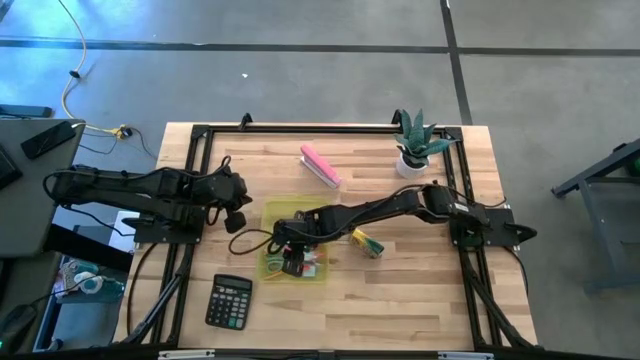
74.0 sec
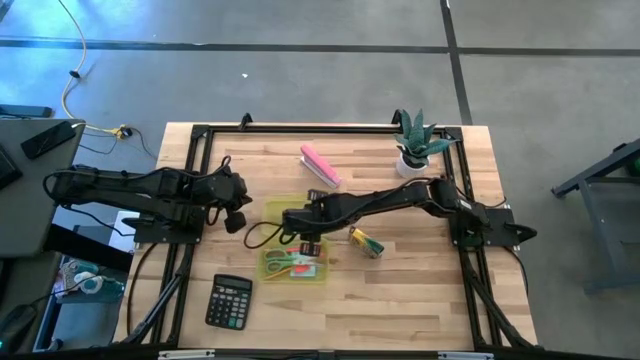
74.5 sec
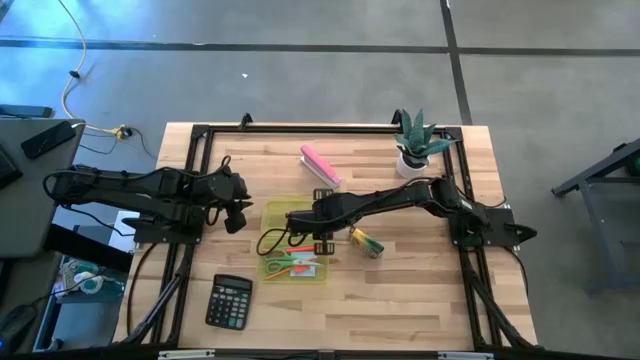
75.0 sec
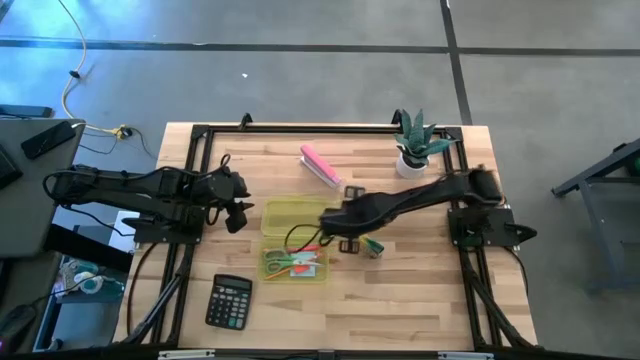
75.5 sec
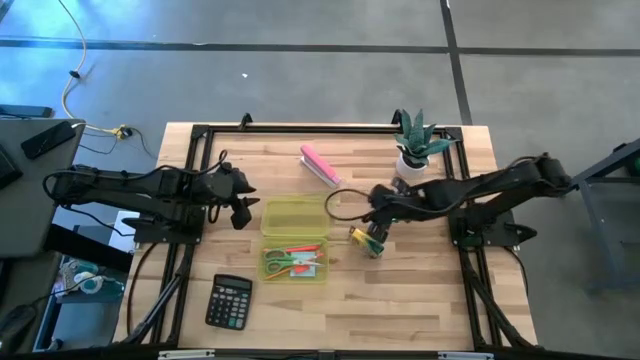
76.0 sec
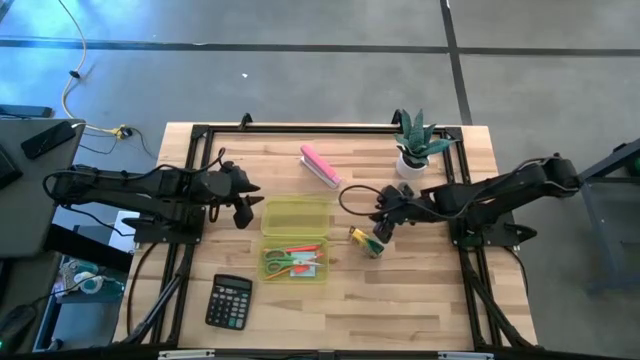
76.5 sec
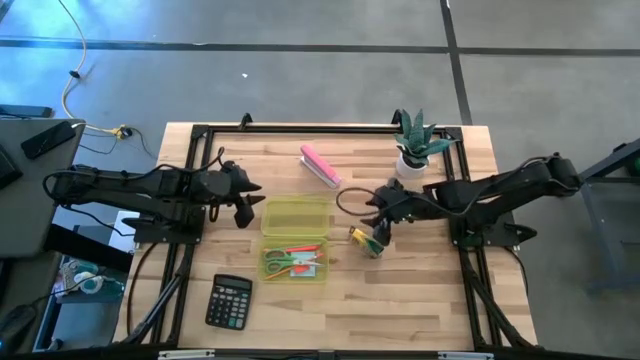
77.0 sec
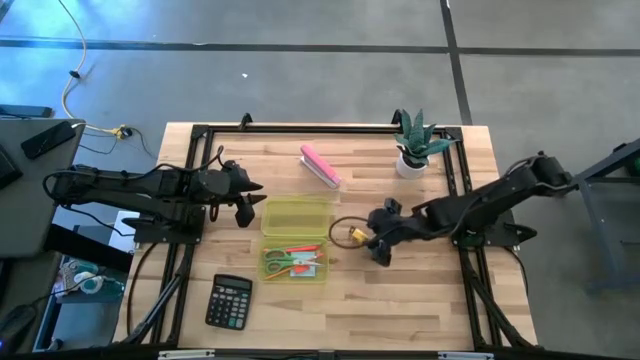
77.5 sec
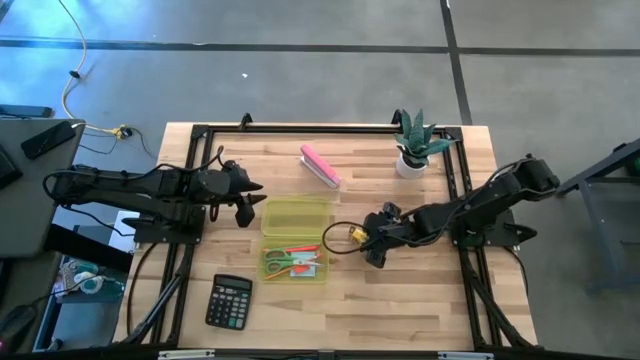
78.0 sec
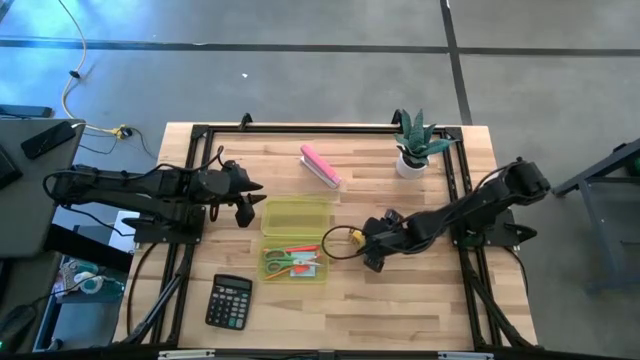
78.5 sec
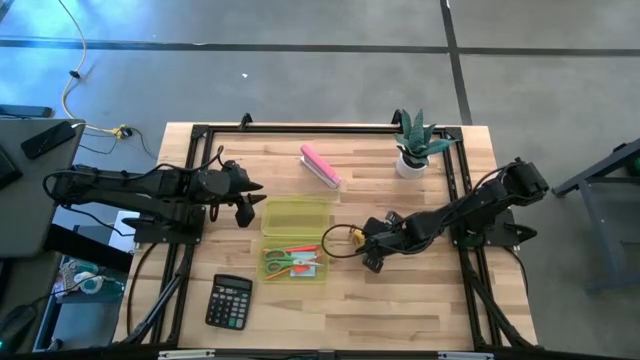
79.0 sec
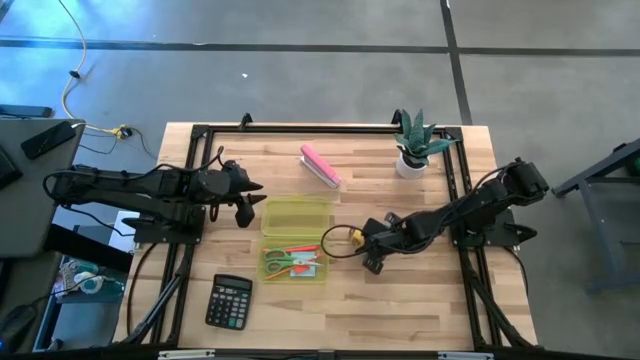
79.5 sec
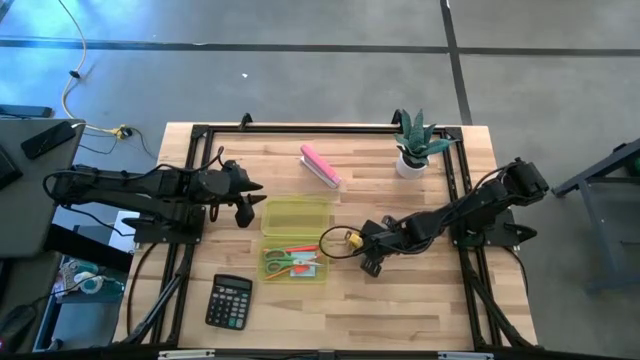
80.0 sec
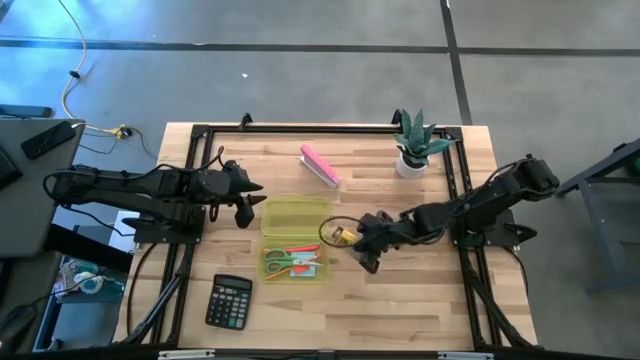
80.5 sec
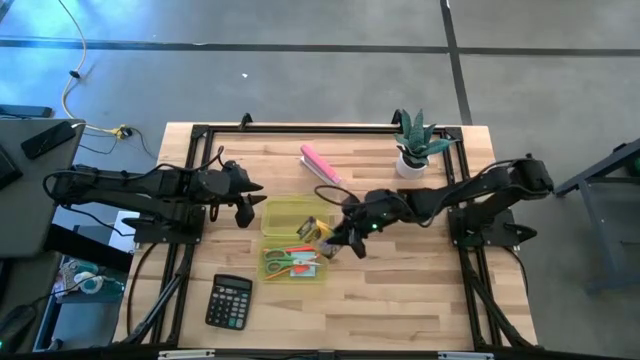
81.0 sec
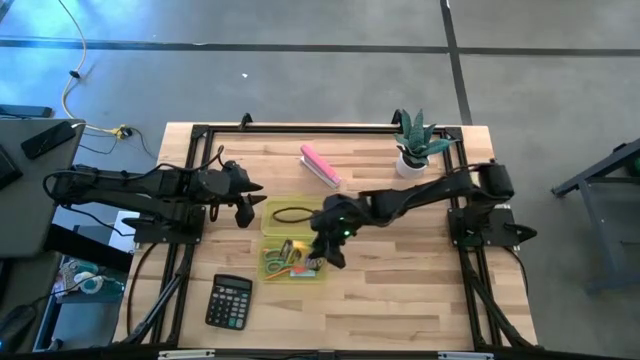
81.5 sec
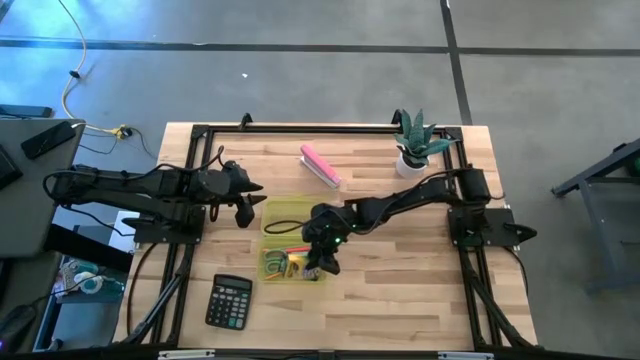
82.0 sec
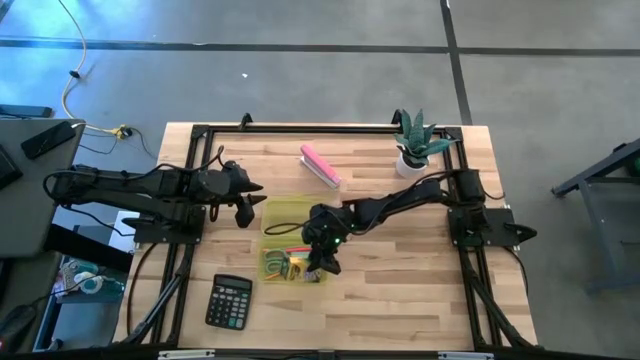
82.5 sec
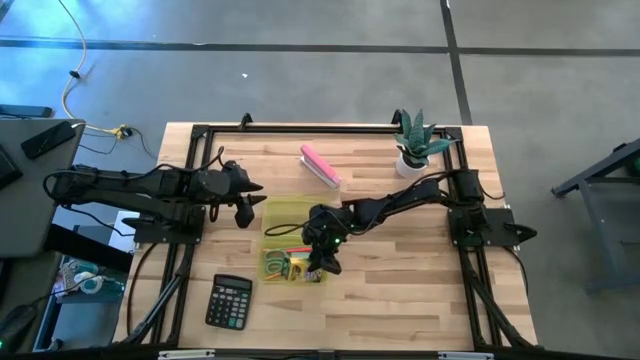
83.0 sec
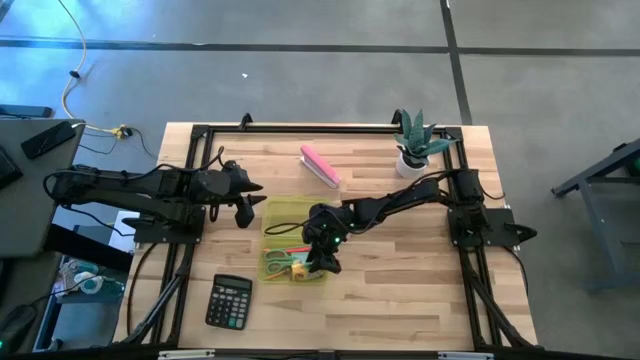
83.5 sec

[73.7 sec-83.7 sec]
Task: Pack school essentials
Put the crayon box into the yellow supply box

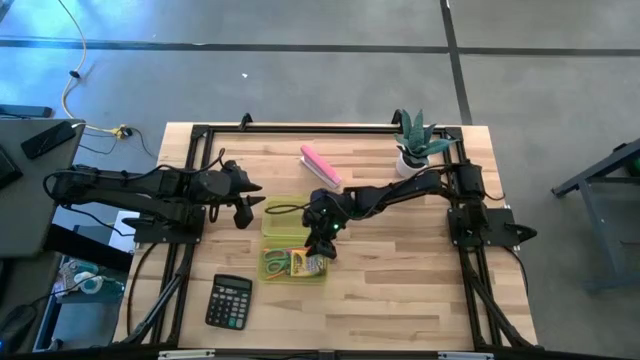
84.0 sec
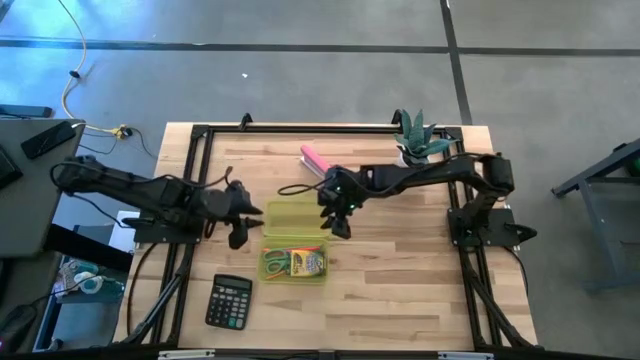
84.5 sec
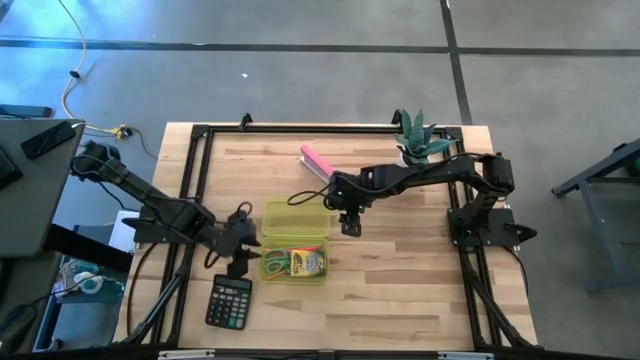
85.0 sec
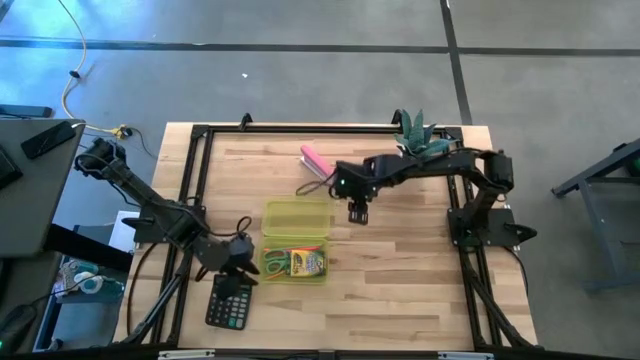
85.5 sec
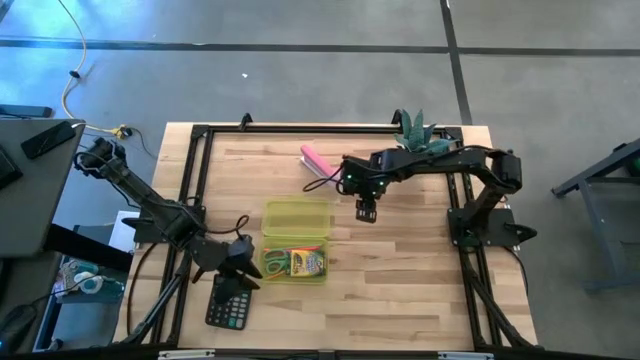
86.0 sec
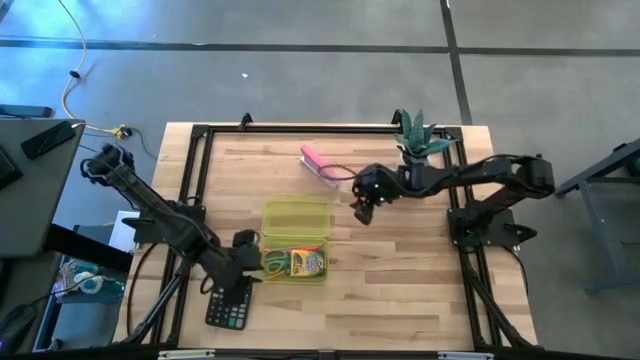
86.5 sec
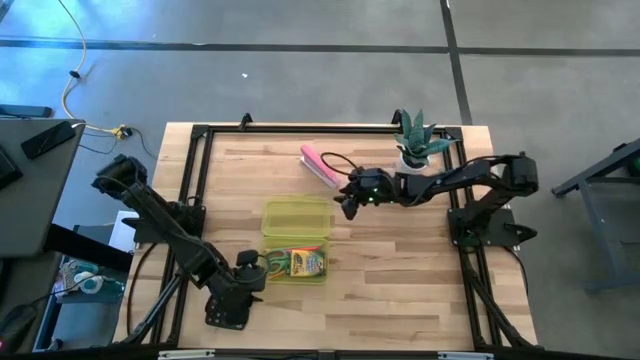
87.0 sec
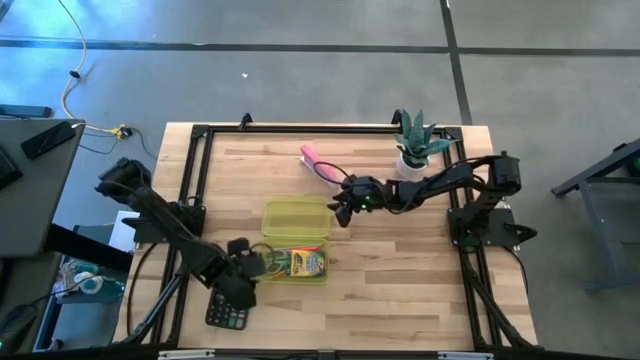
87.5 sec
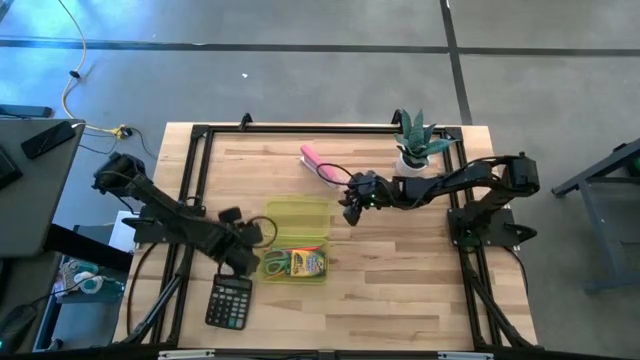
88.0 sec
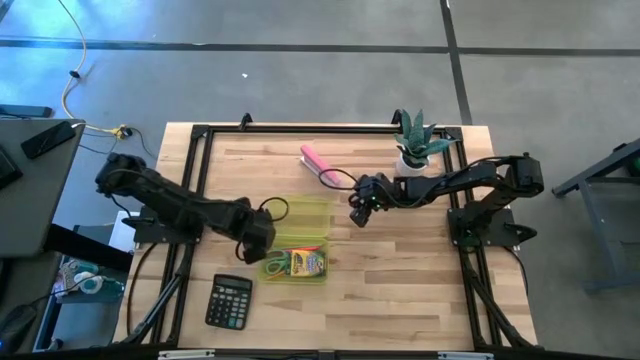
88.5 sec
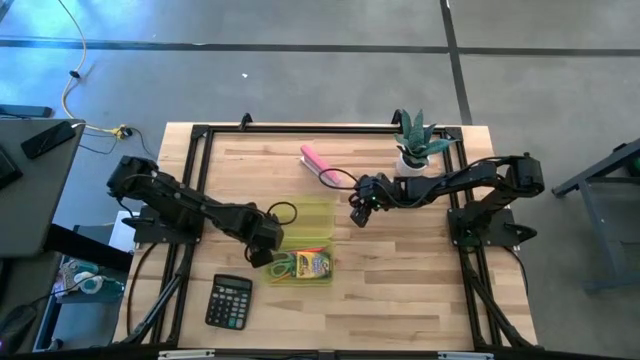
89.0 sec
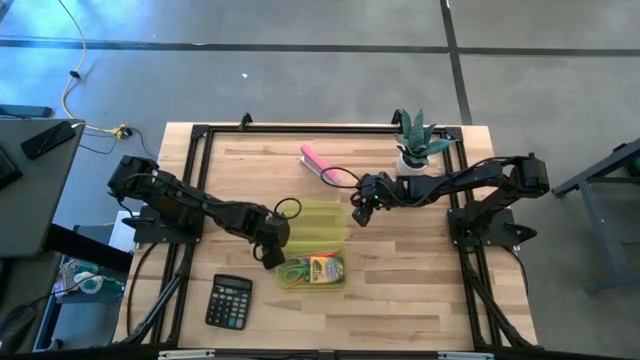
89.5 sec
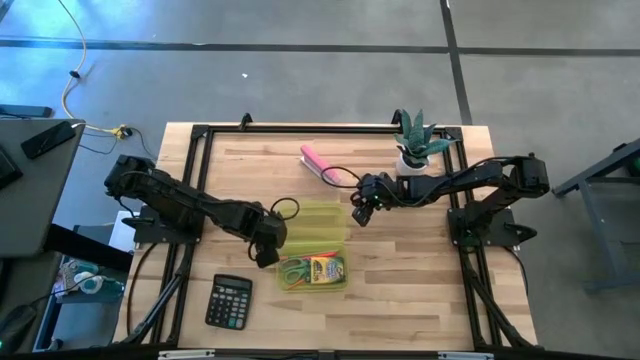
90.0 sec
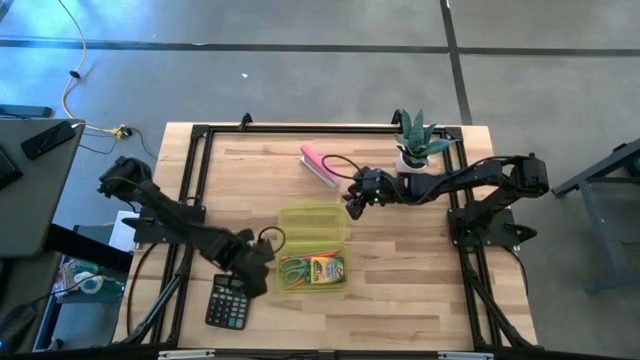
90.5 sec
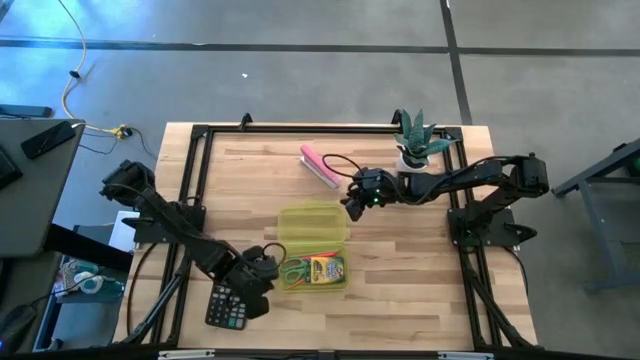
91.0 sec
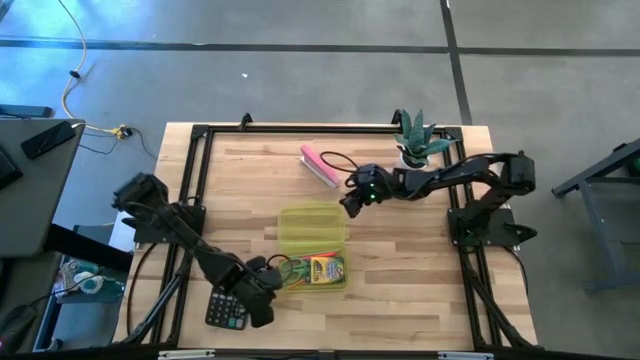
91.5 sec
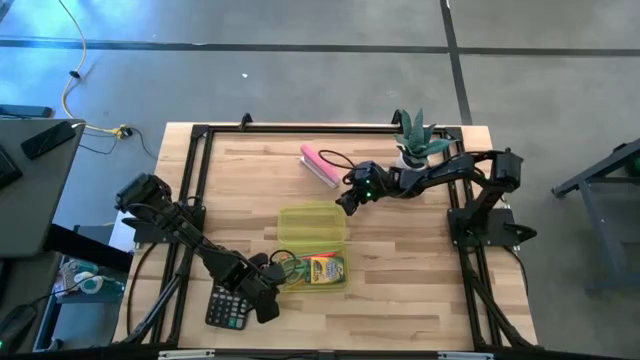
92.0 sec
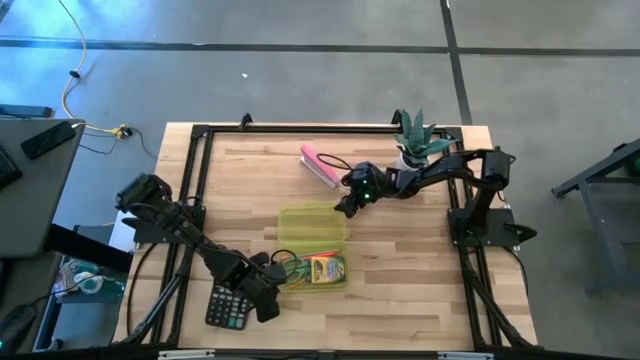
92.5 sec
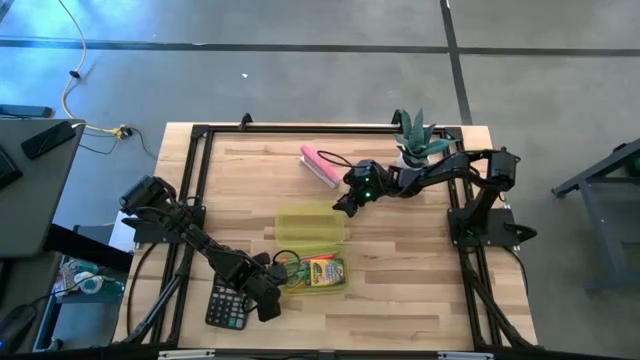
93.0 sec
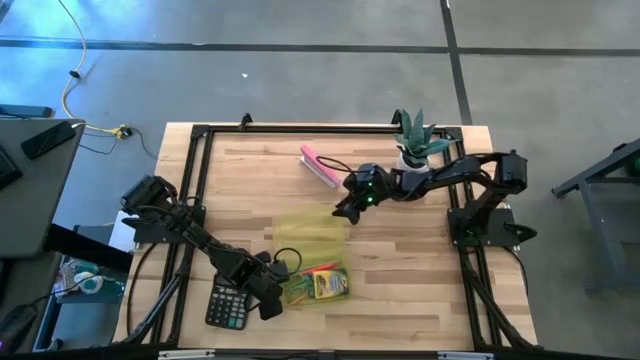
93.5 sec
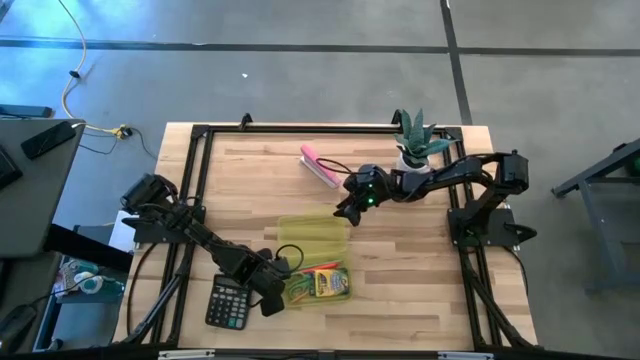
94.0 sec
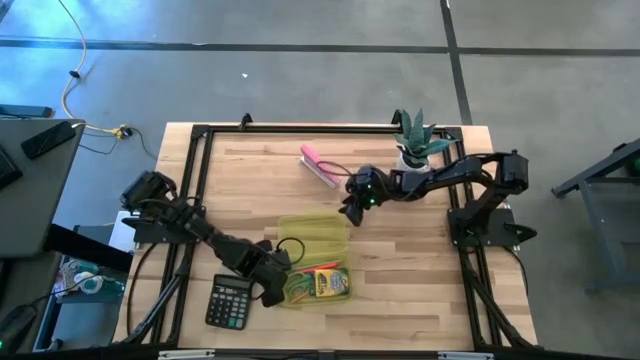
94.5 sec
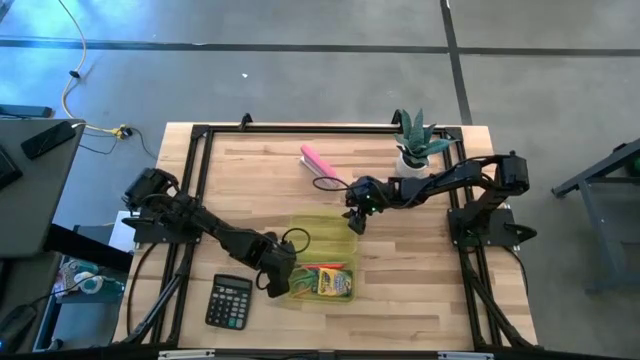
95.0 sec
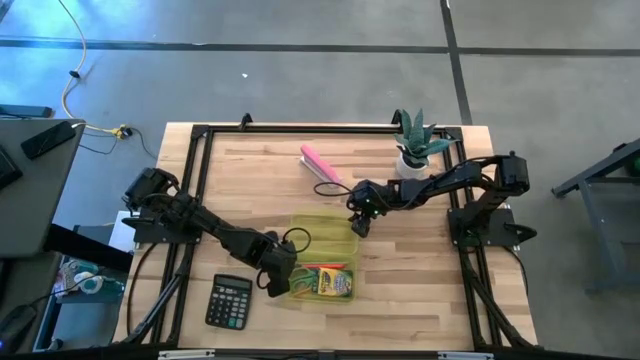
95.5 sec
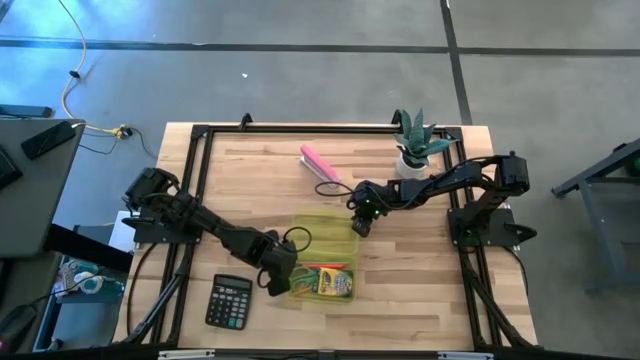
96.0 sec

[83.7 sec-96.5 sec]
Close the yellow supply box
